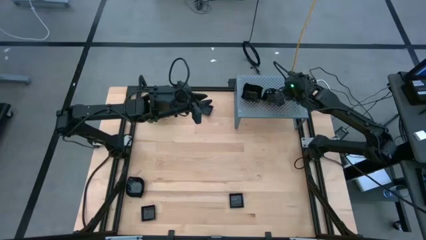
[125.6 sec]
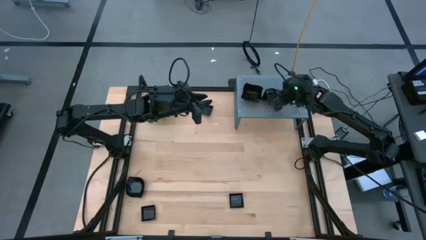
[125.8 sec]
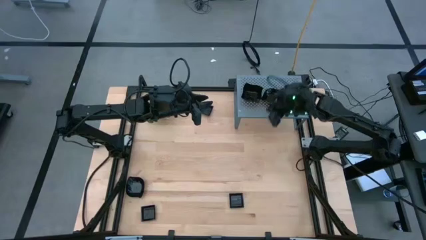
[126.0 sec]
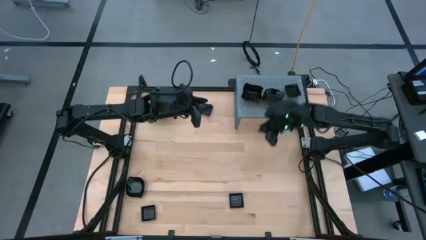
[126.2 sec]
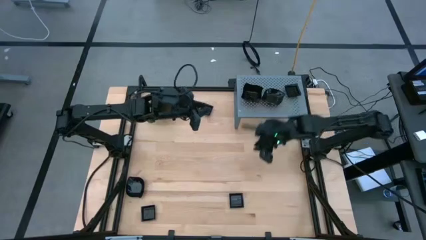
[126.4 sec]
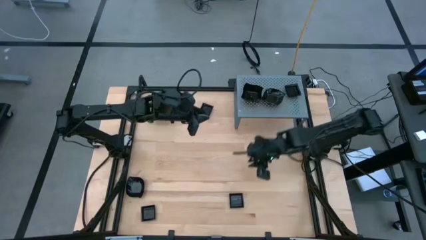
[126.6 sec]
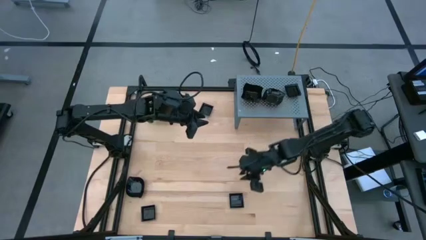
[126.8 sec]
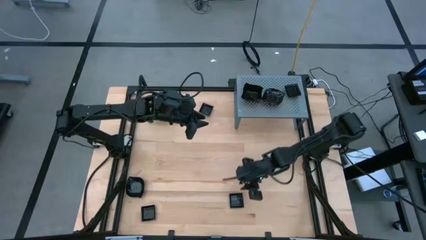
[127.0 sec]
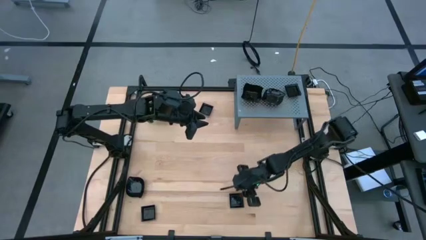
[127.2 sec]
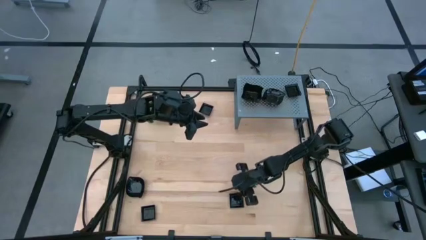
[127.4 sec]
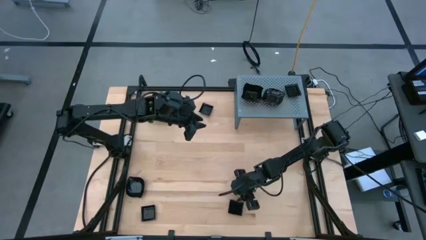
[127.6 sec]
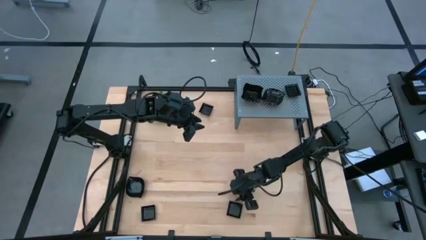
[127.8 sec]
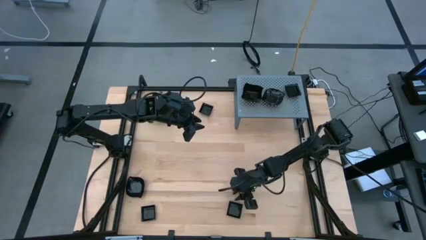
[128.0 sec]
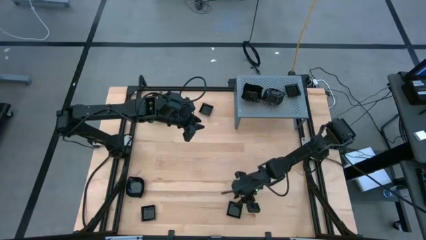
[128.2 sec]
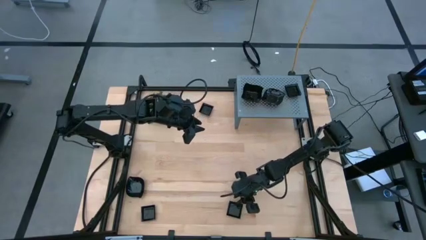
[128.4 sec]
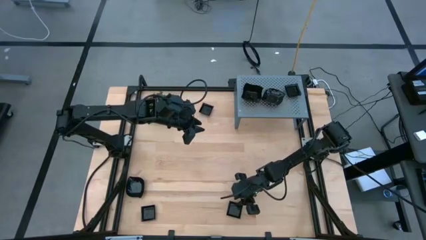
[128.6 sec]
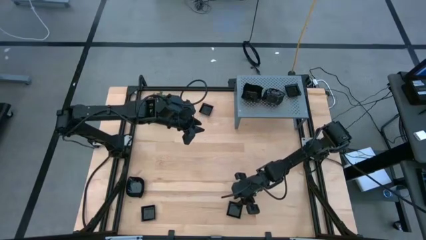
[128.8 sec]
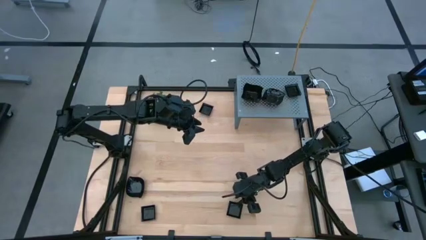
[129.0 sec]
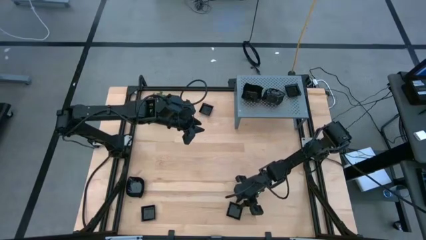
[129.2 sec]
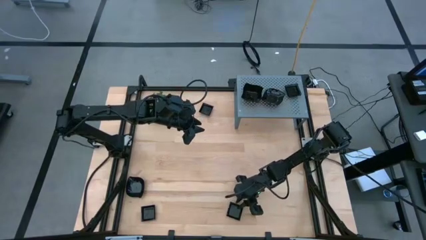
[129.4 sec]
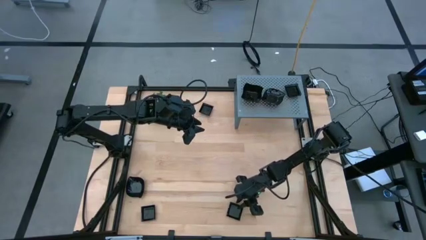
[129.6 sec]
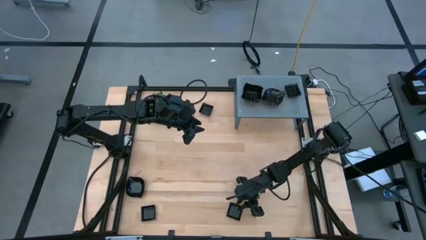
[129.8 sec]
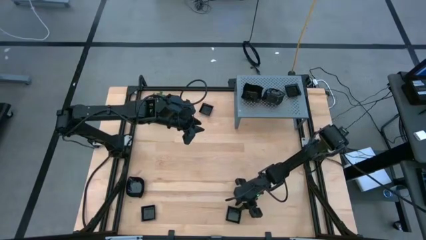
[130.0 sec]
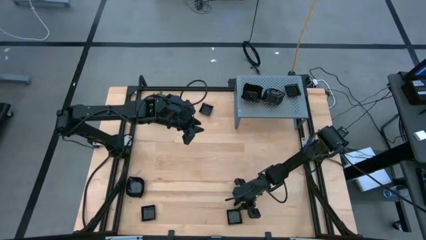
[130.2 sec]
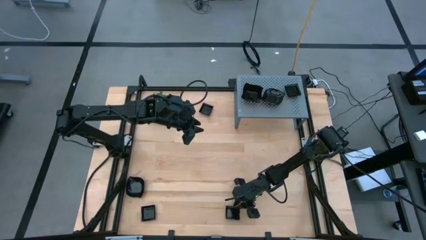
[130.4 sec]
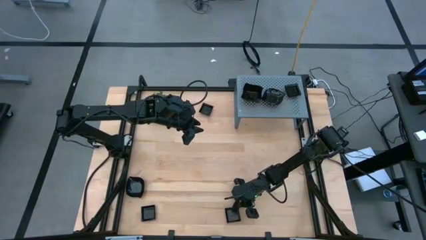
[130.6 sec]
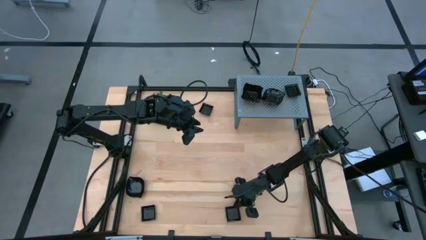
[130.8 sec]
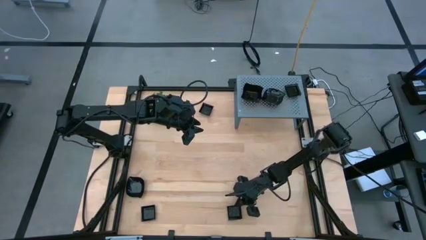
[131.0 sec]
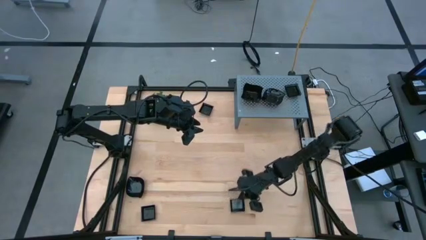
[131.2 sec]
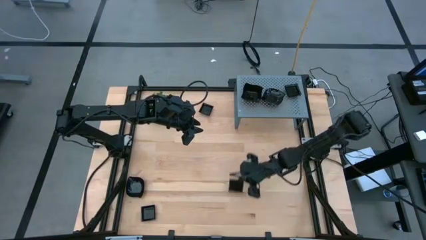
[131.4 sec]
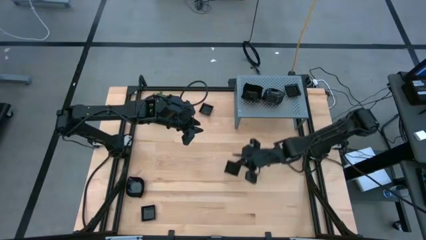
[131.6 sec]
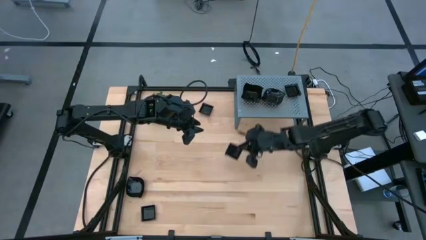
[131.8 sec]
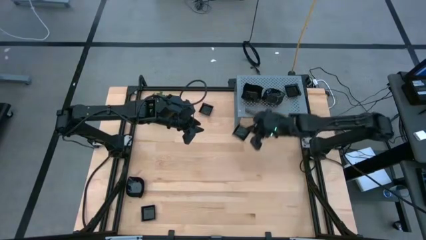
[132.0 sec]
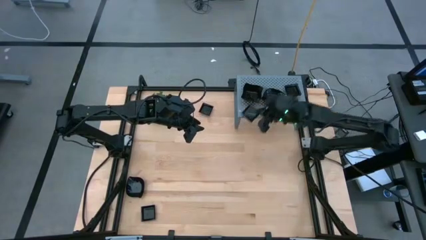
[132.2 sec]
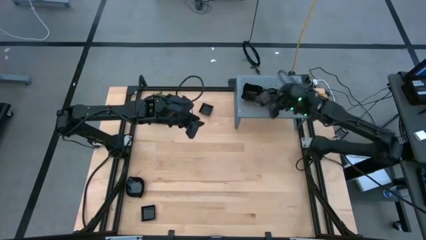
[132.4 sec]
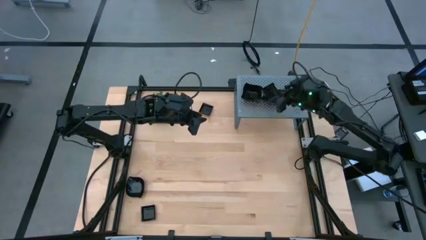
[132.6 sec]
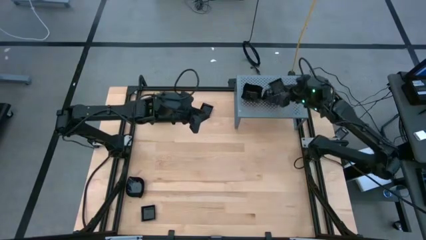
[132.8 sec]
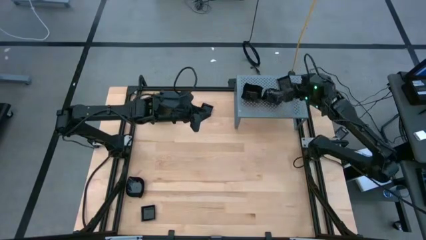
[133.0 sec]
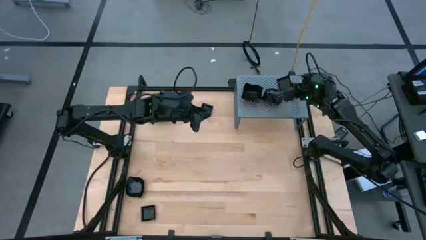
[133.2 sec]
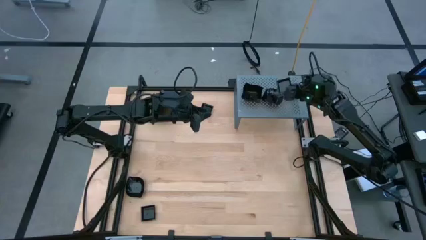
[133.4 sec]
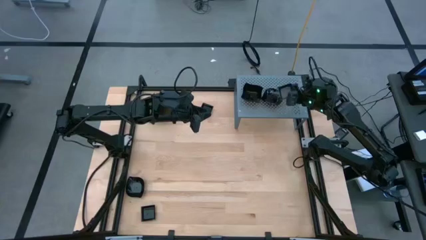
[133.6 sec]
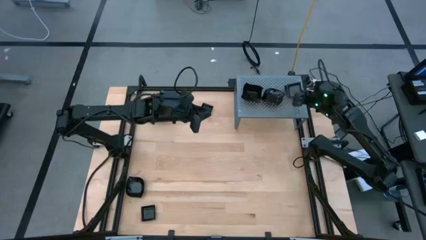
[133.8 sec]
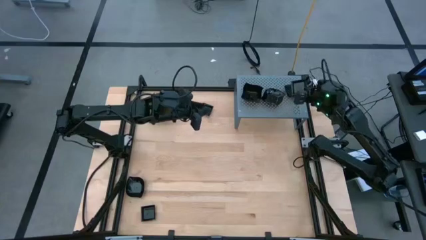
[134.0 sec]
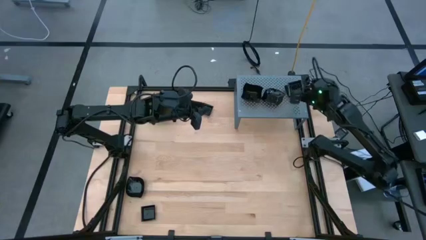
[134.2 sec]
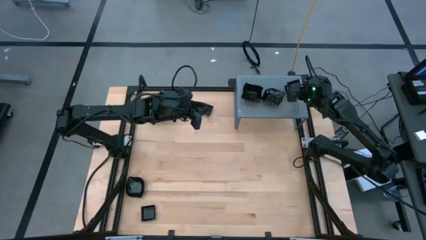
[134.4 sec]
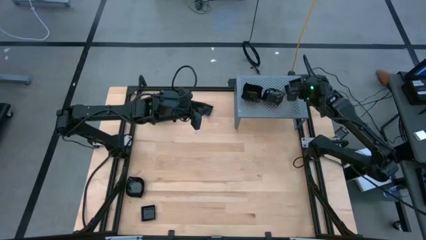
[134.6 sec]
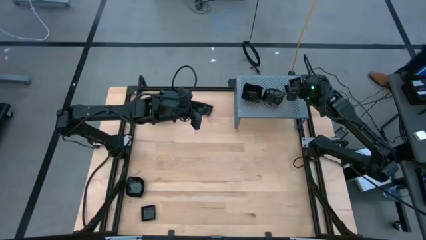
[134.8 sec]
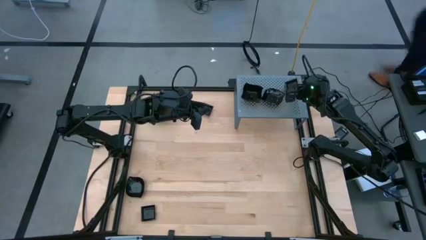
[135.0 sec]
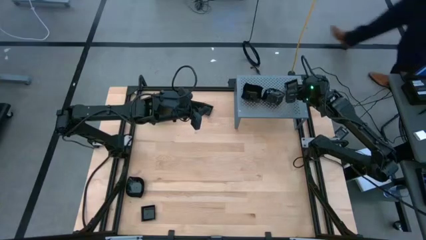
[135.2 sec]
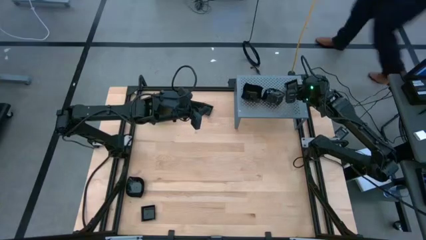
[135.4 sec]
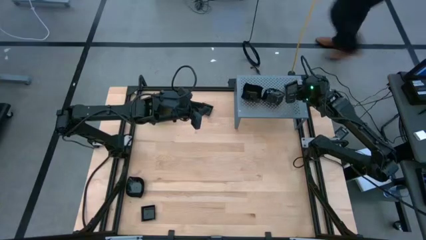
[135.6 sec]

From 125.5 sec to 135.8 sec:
Task: Pick & Place Mini shaped plates
Stack the square plate on top of the square plates on the shelf
